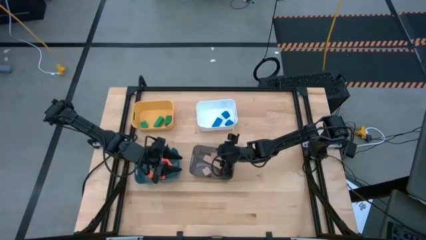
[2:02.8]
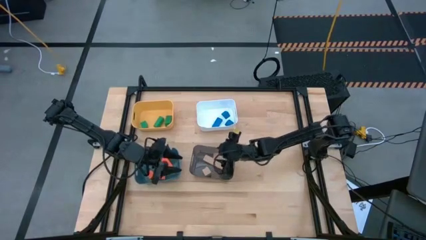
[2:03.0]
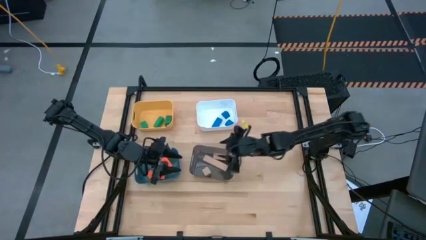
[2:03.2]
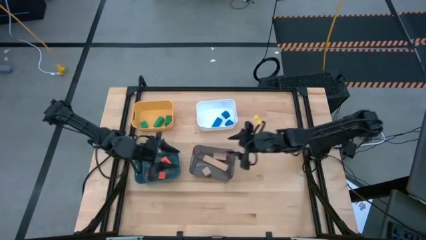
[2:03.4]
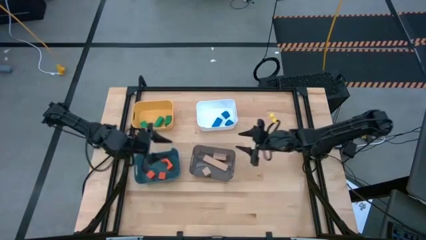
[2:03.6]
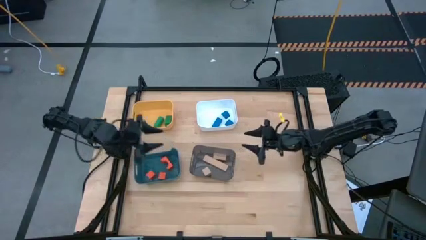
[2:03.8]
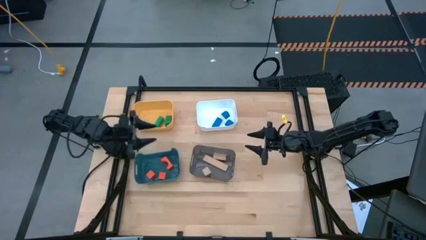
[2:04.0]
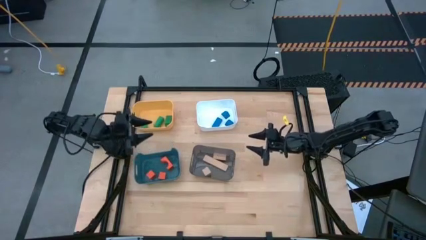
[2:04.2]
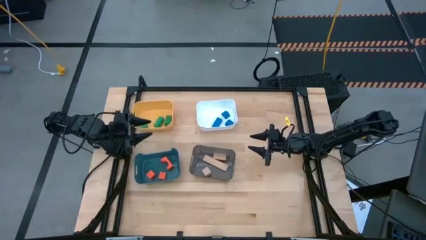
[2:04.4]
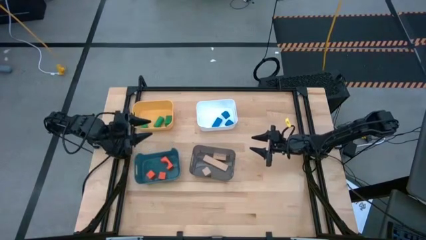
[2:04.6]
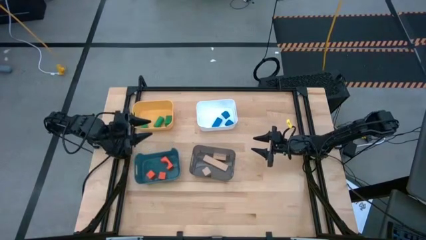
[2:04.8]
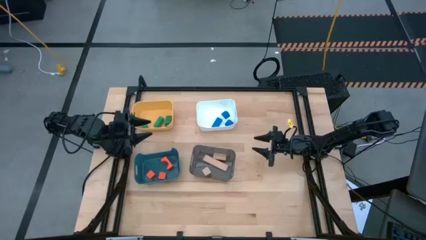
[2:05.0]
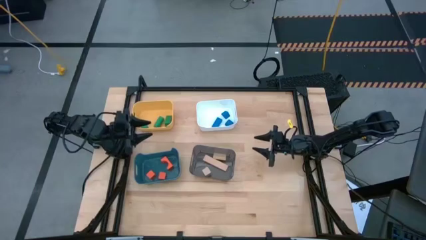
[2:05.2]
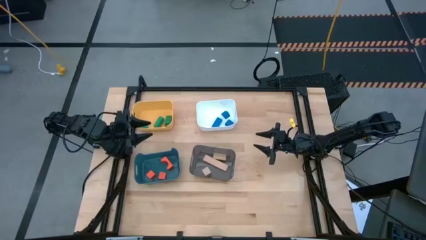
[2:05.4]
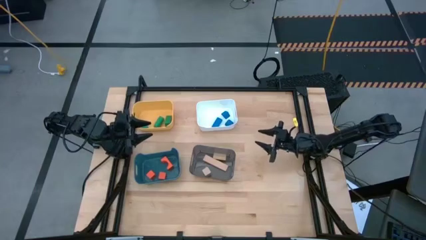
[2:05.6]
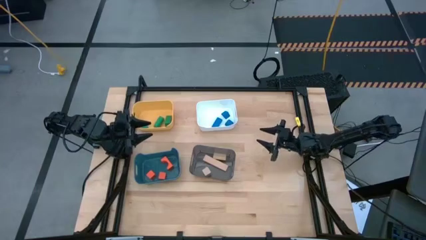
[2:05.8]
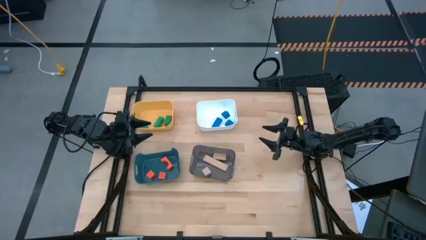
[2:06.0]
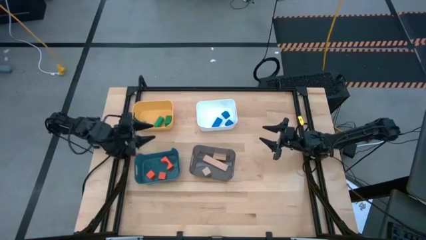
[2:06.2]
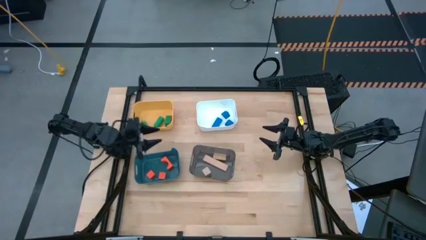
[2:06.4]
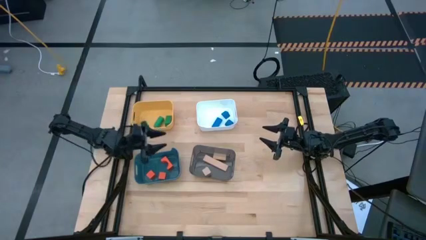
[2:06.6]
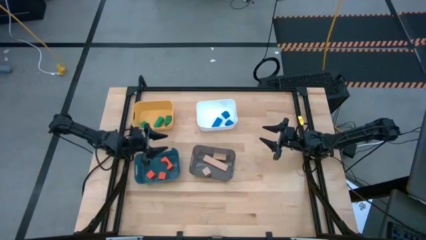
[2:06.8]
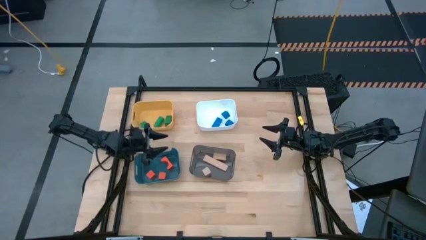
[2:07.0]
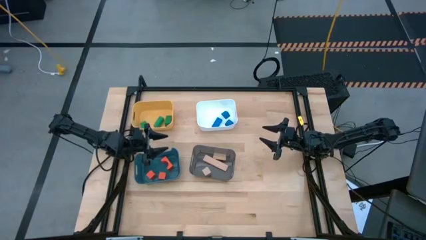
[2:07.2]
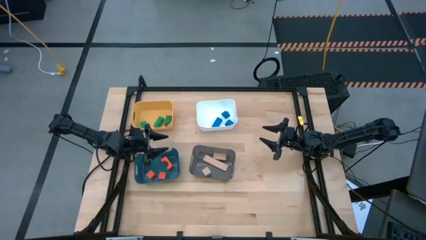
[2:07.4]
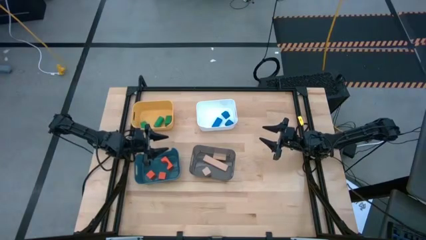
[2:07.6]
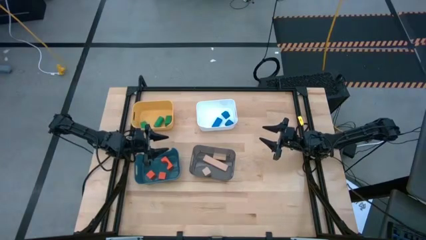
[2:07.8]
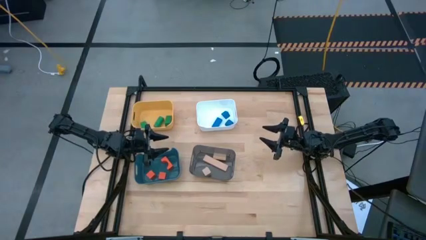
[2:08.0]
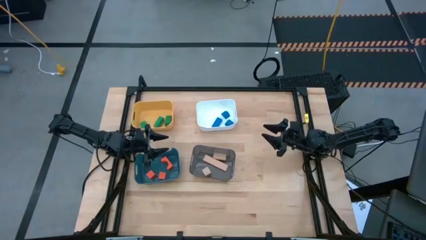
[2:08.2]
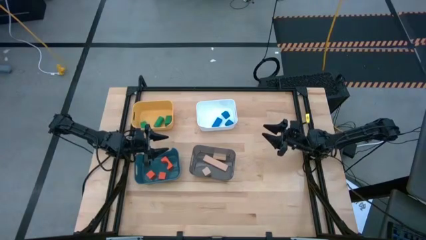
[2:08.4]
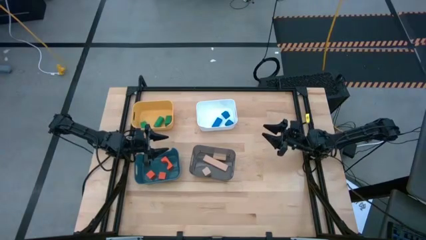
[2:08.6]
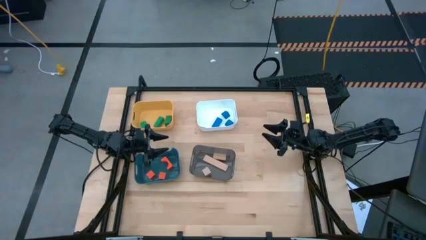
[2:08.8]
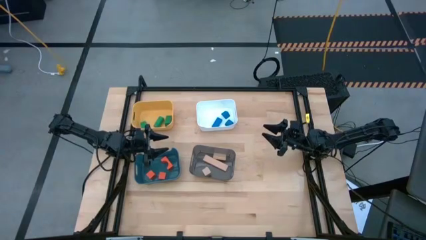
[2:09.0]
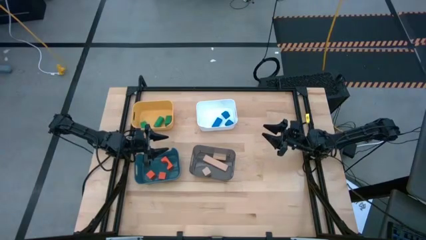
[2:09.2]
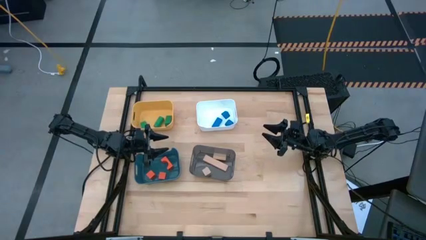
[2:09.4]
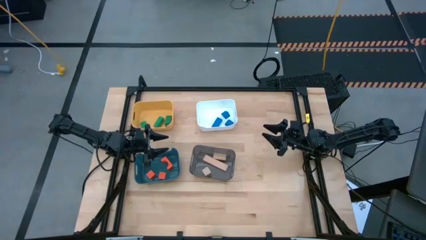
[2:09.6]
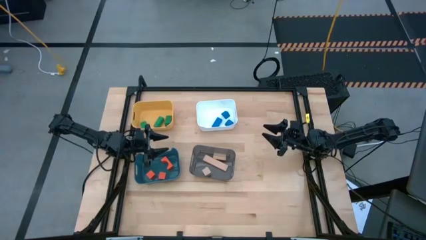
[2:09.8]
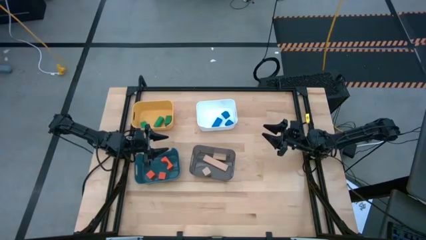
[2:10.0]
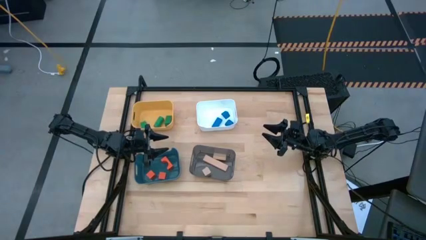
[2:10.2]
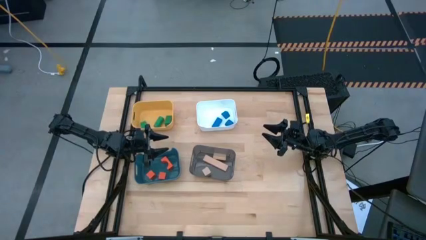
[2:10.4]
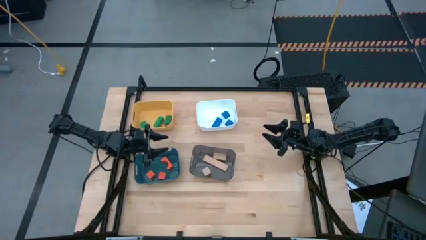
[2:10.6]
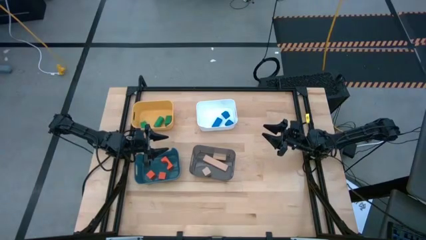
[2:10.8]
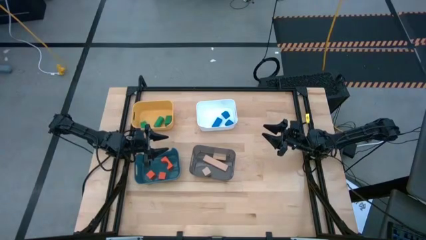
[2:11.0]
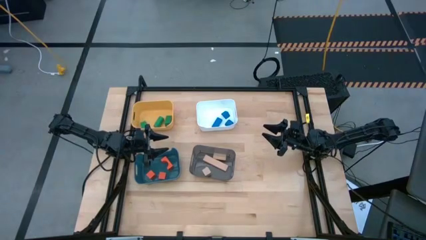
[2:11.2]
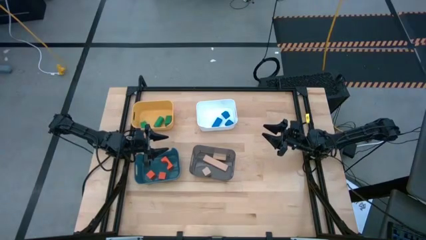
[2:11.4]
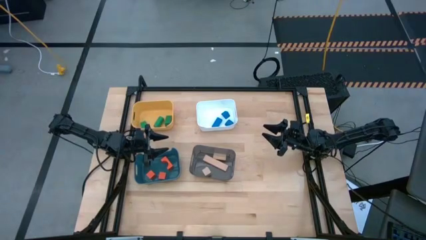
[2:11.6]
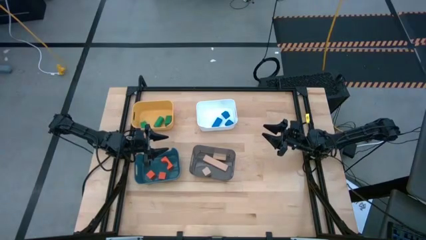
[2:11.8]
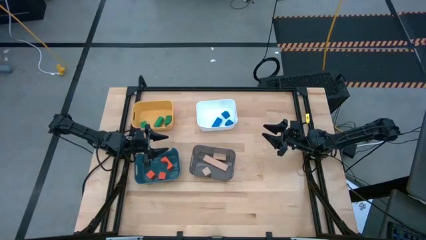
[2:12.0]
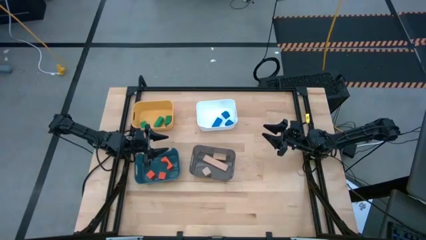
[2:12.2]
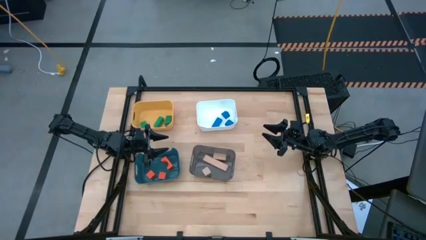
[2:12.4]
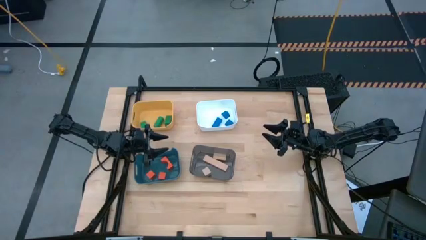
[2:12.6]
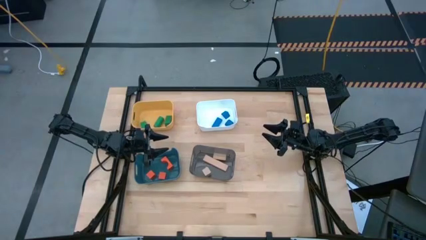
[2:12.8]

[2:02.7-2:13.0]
Task: Sort & place blocks by color
Return to Home Position
